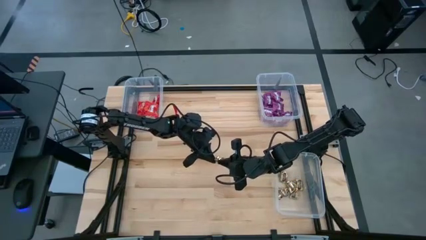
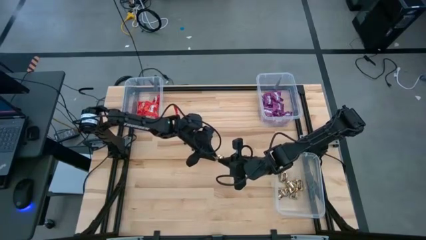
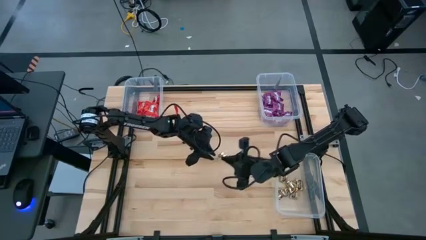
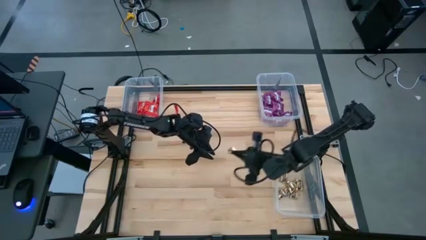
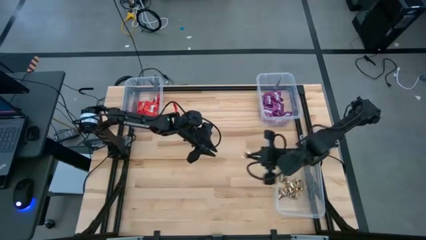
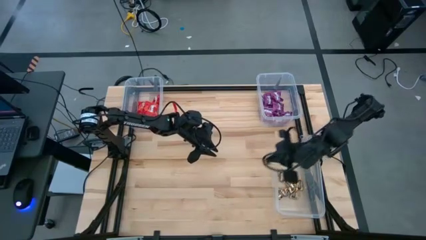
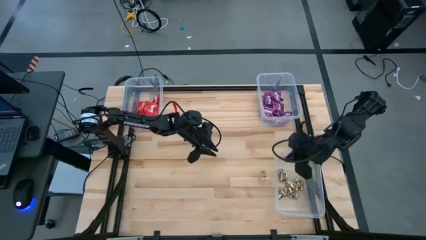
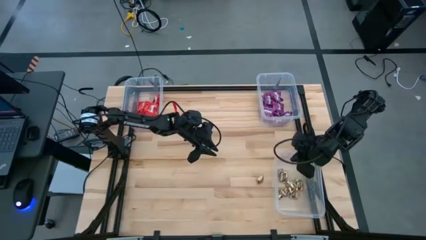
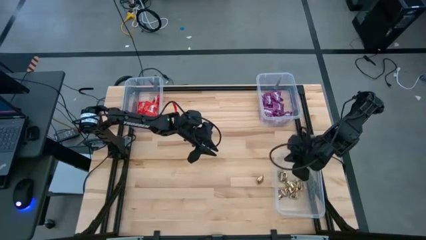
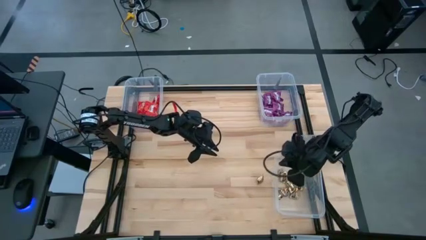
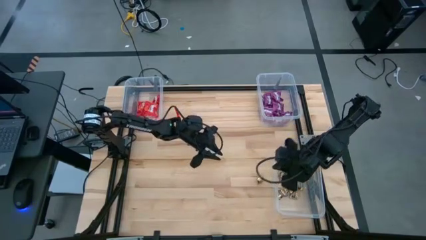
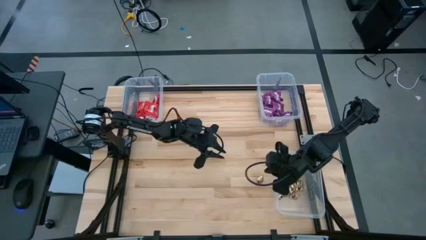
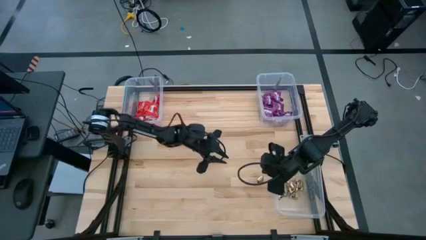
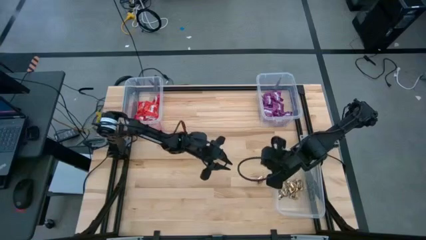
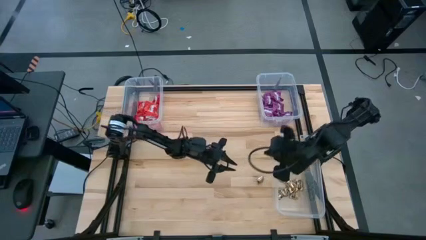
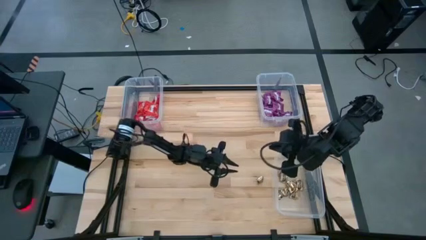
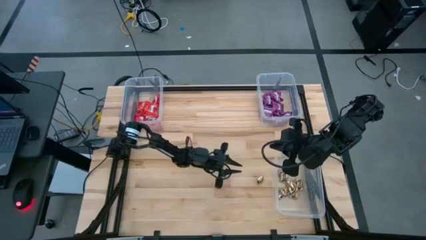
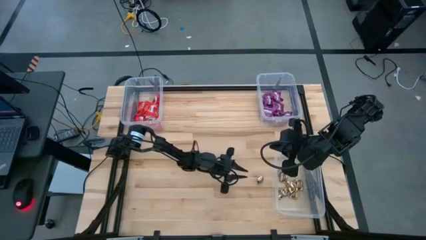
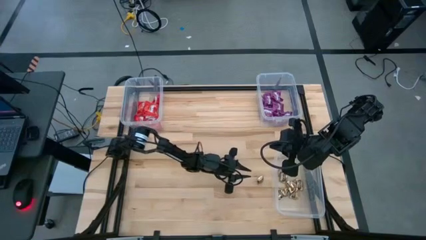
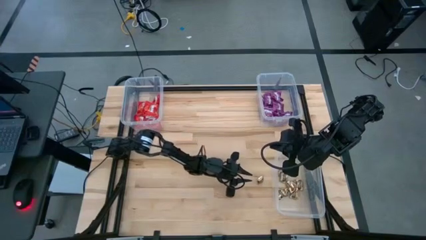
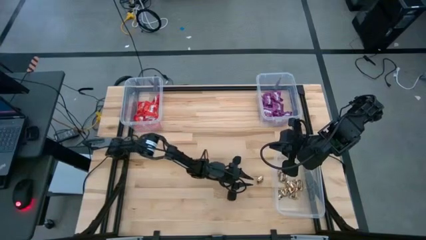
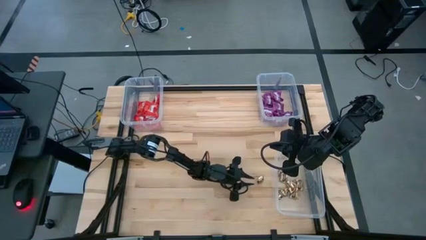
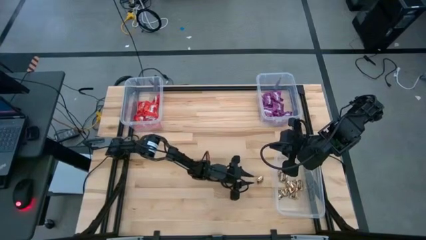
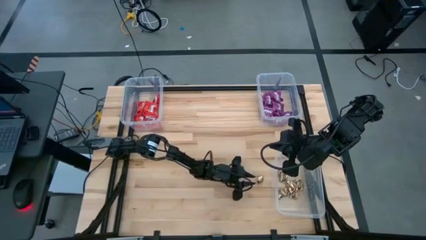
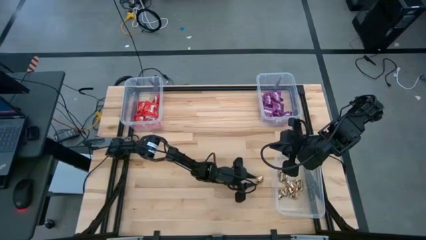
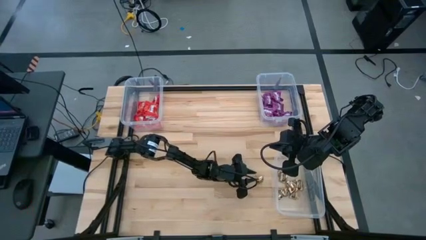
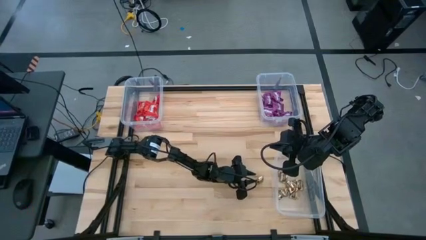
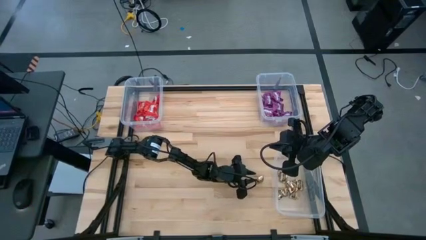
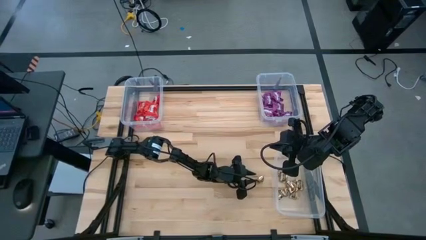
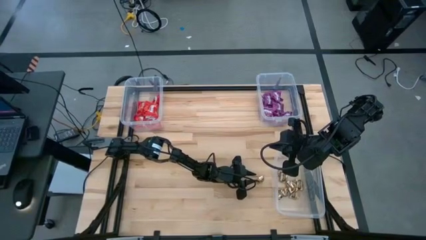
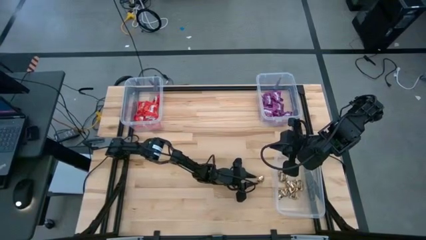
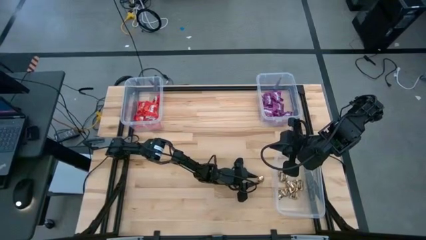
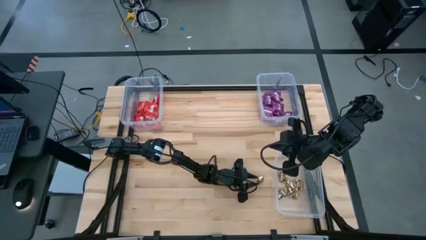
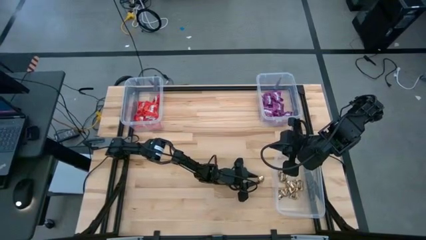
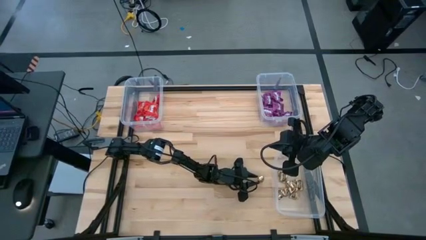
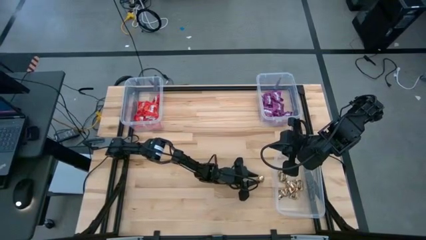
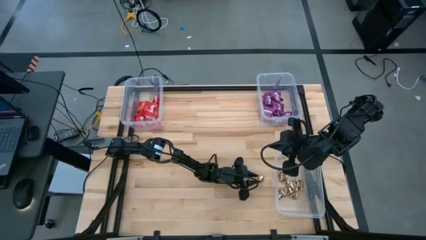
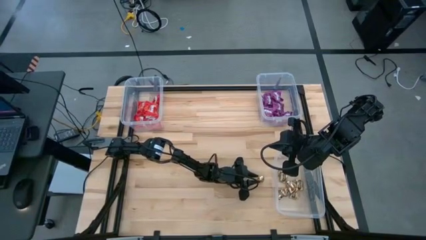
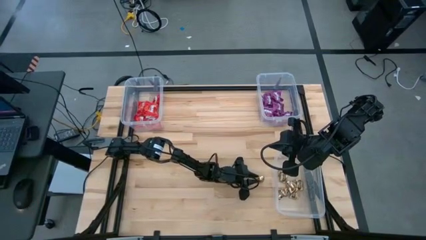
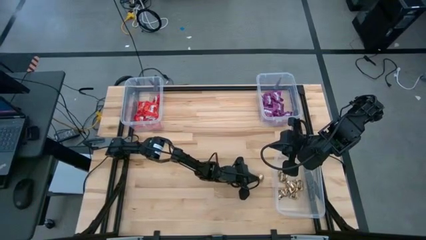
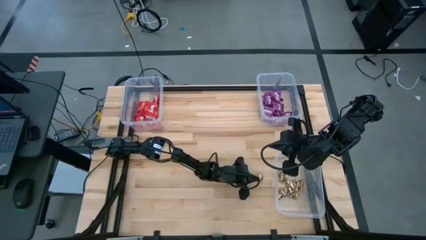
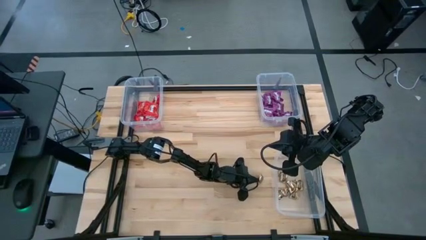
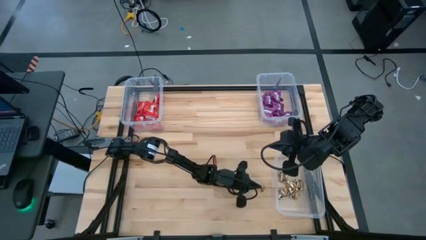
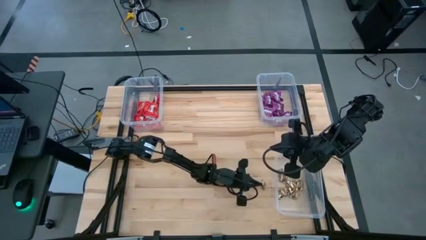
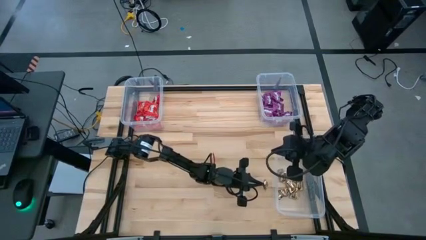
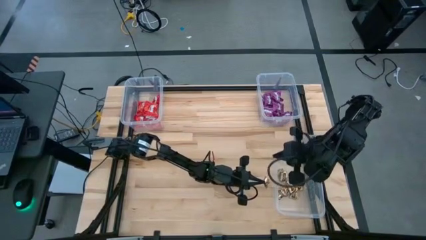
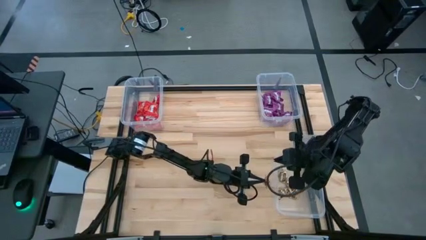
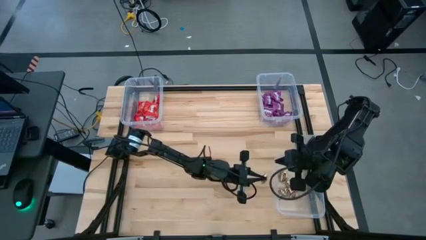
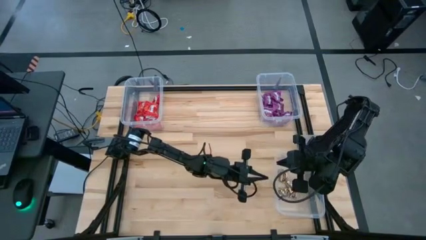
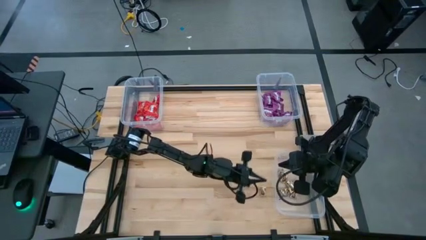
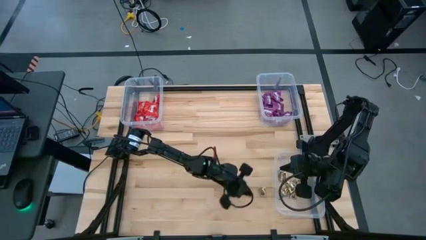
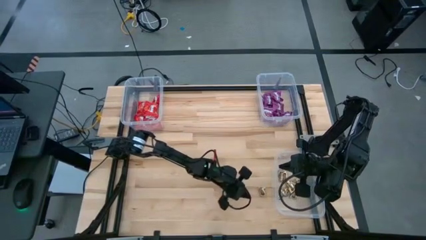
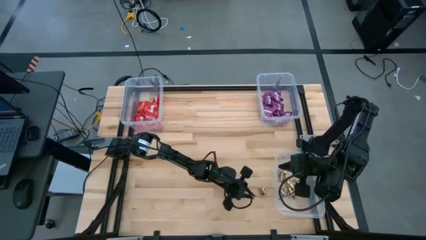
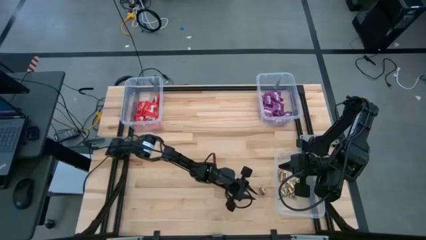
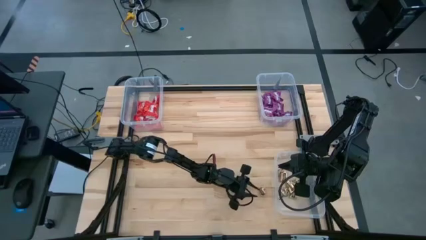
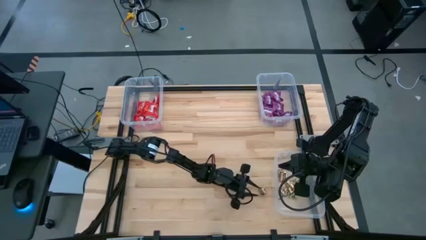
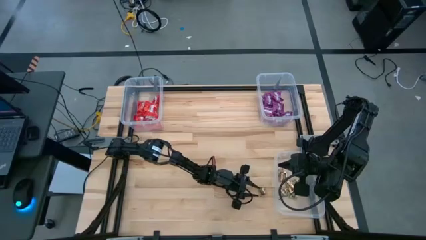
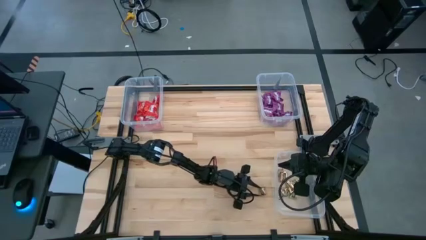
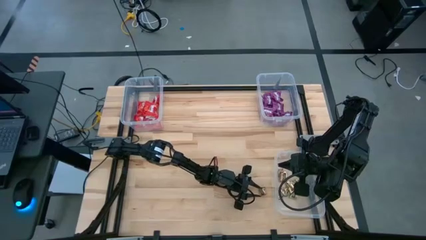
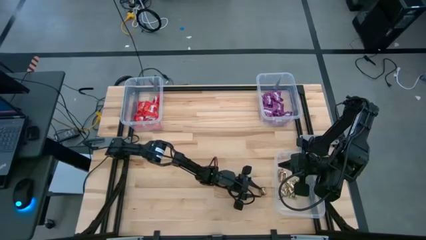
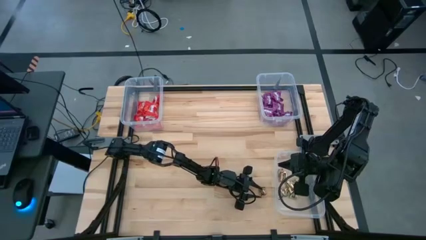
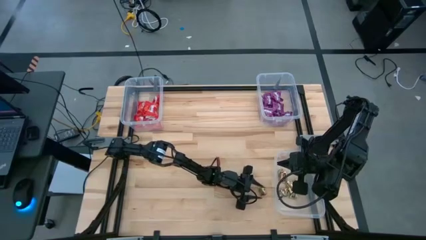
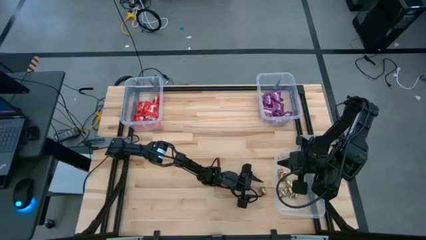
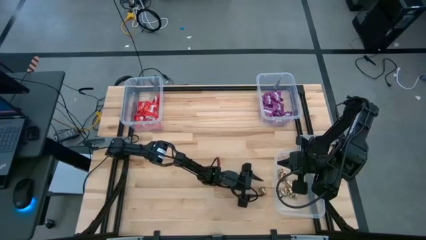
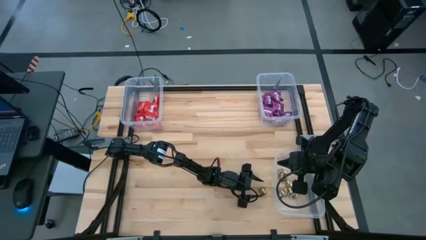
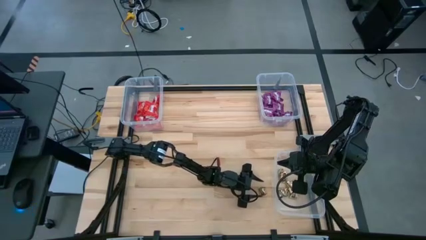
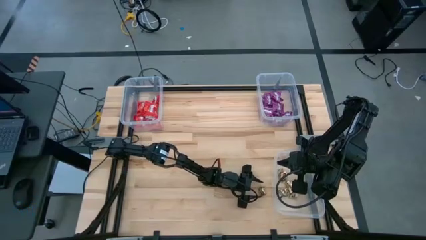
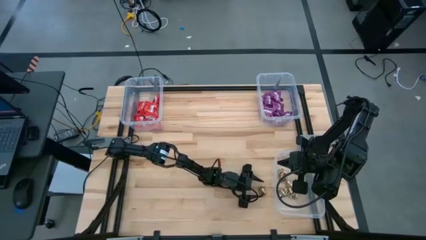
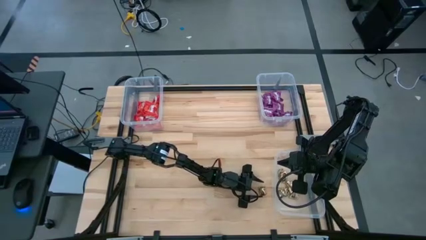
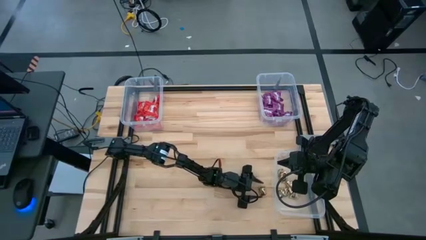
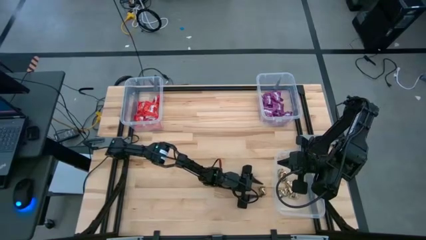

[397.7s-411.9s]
Task: Sort candy
Put the yellow candy into the bottom right transparent bin

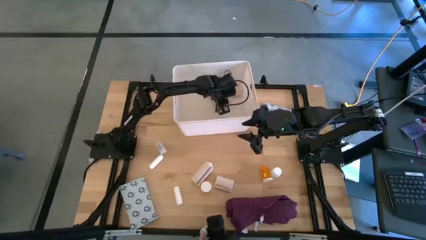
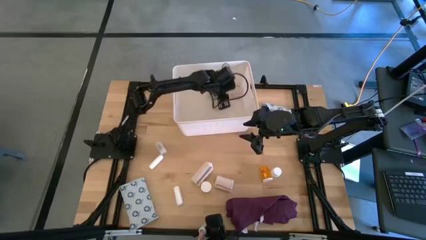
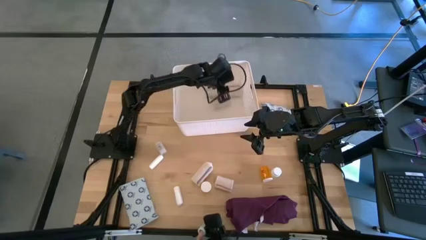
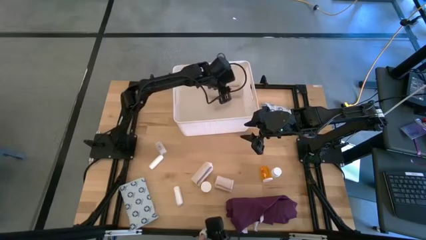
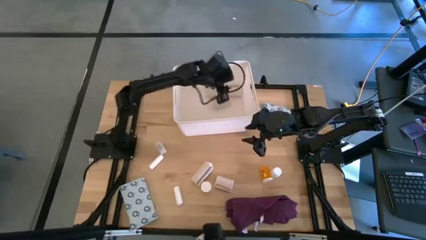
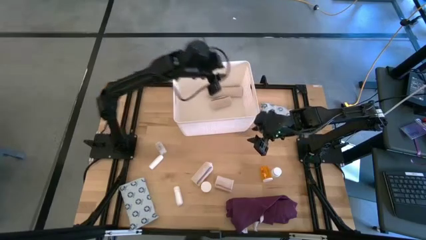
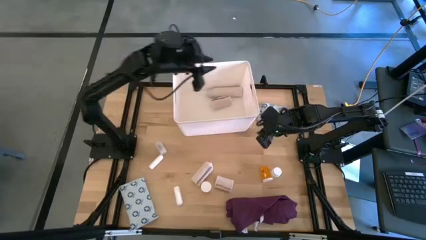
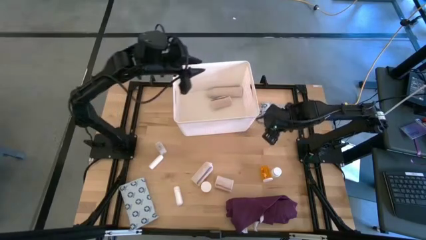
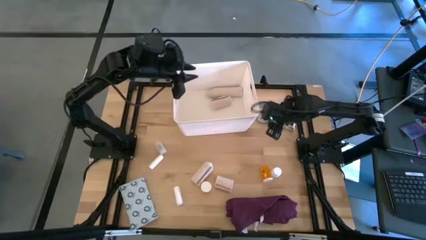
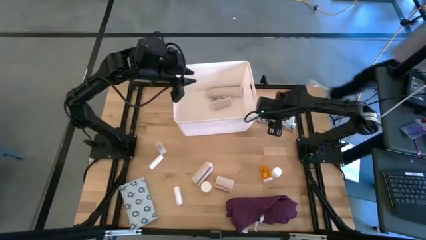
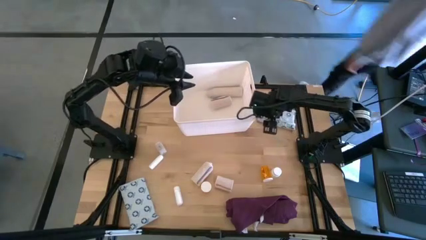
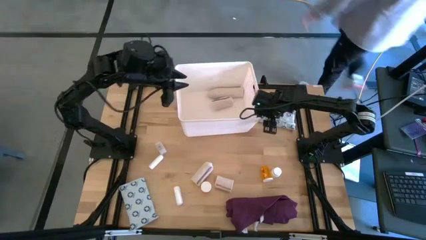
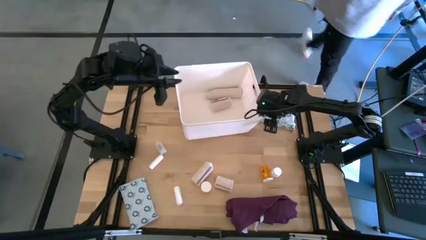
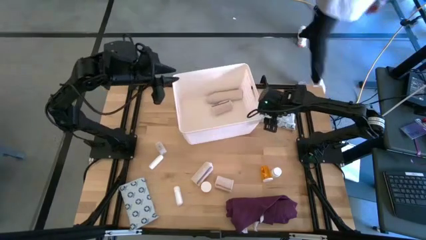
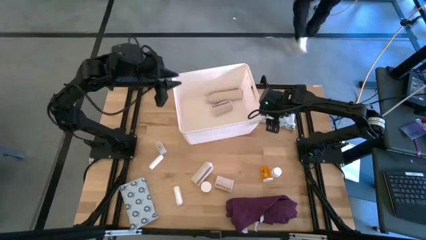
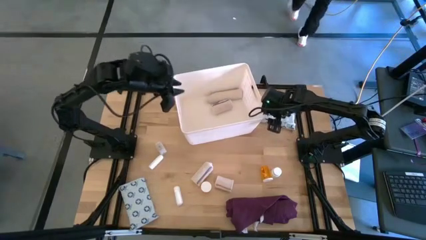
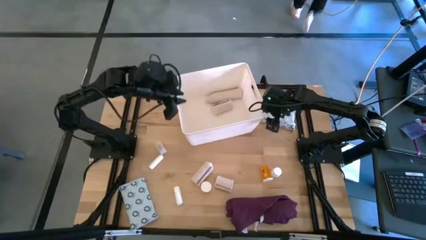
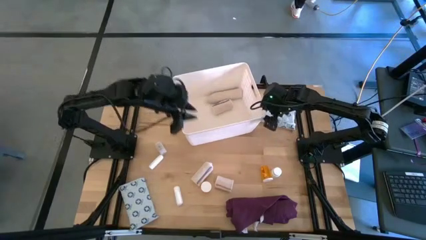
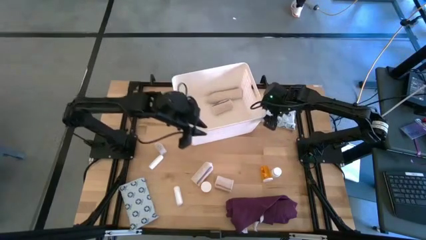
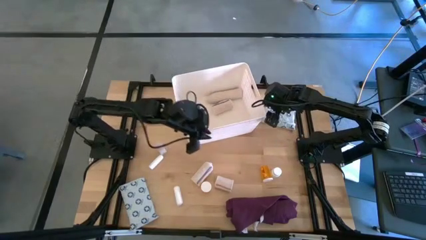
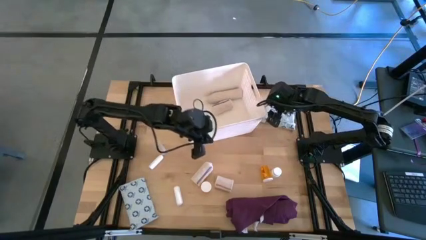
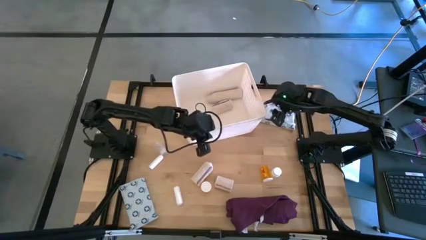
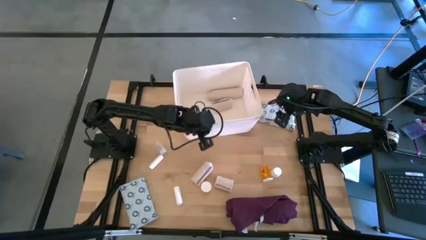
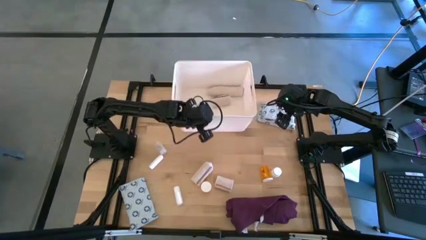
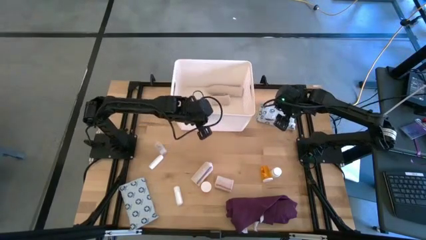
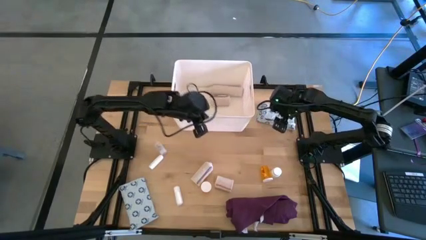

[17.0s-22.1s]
Task: Pick & place medical supplies in basket/bin
Adjust the white bin
